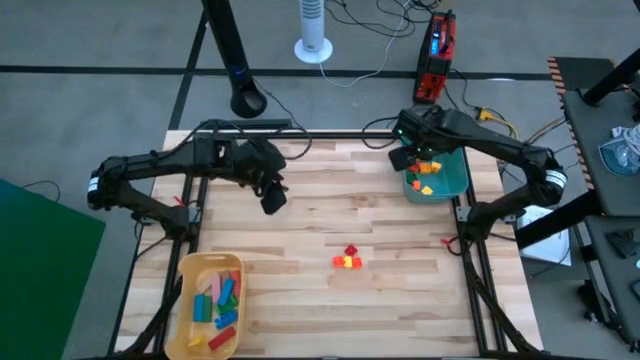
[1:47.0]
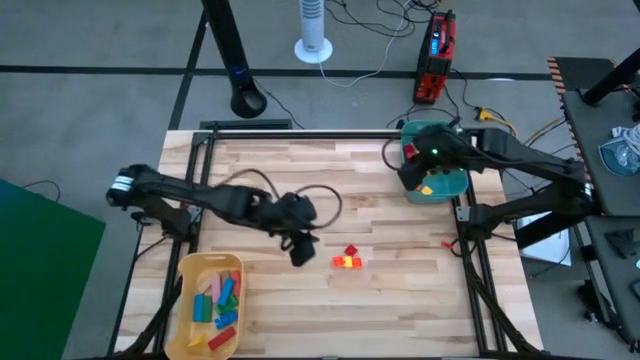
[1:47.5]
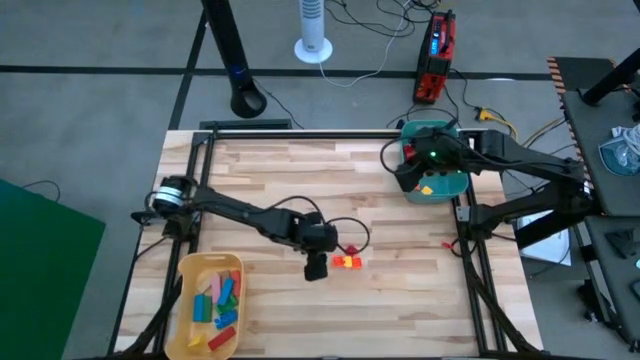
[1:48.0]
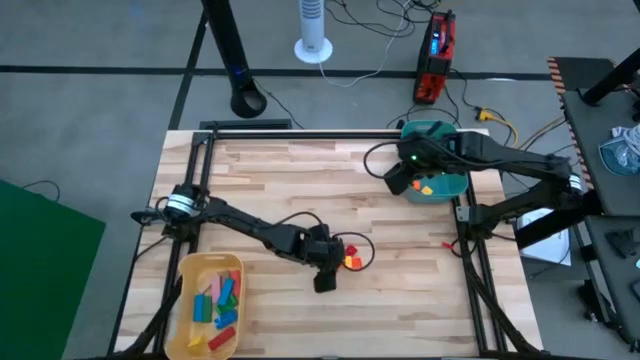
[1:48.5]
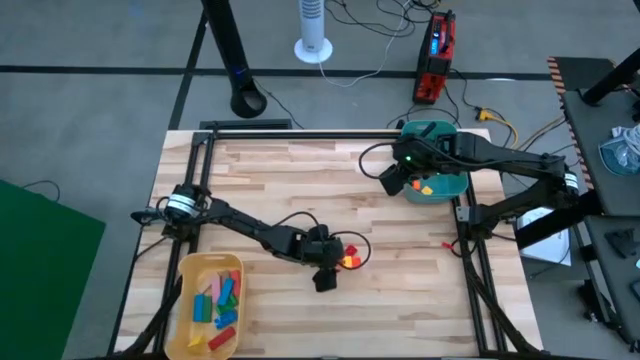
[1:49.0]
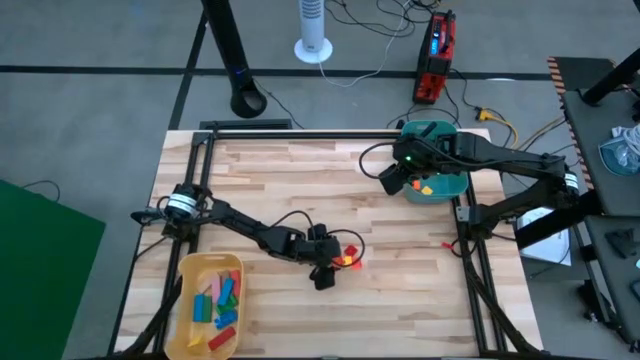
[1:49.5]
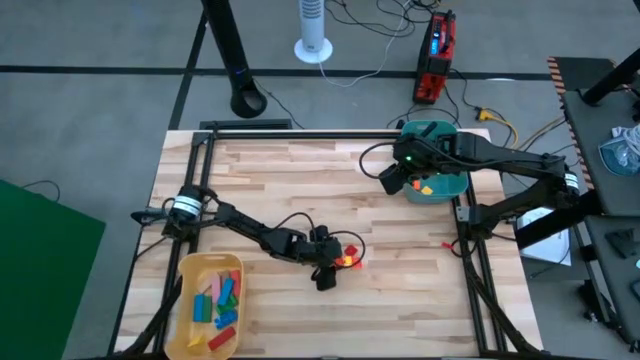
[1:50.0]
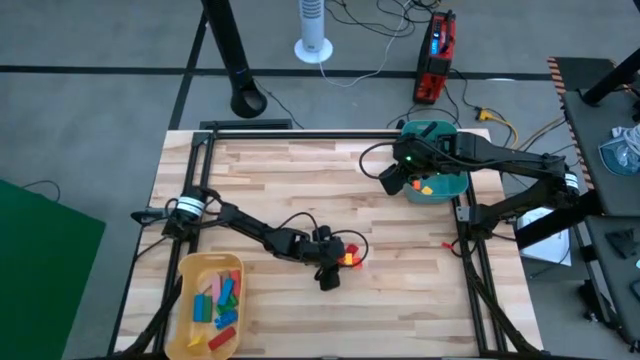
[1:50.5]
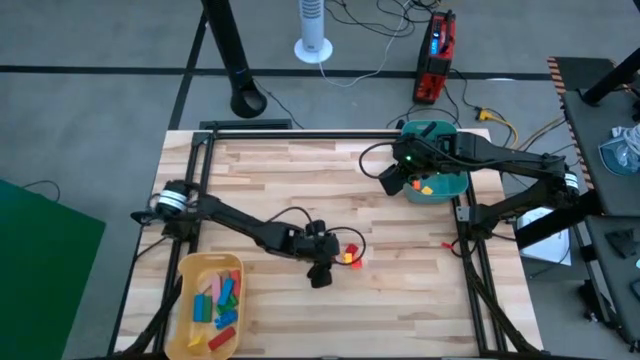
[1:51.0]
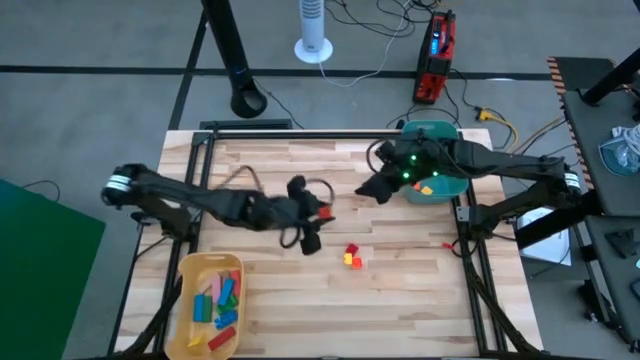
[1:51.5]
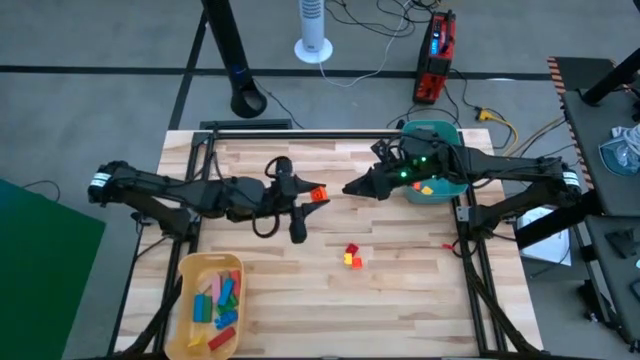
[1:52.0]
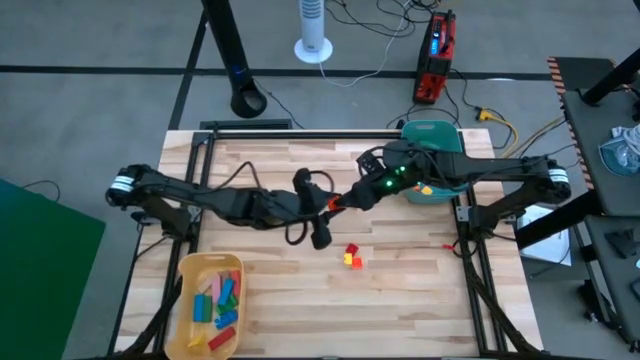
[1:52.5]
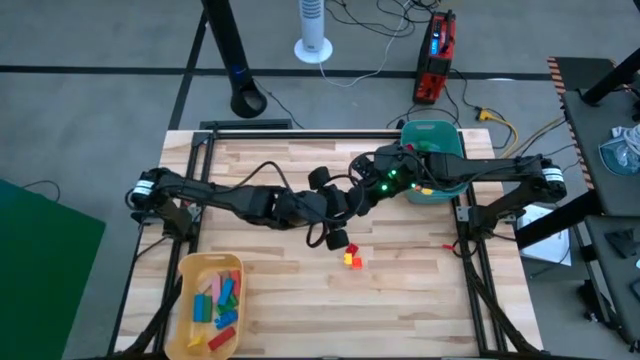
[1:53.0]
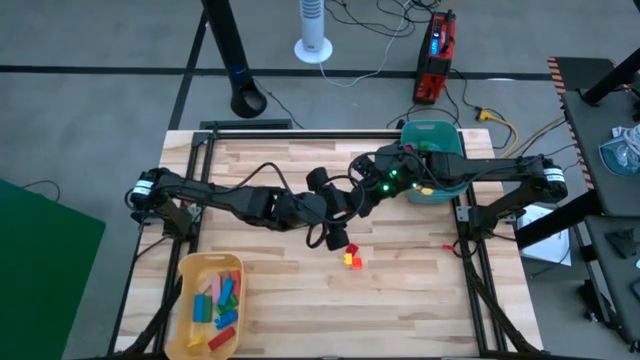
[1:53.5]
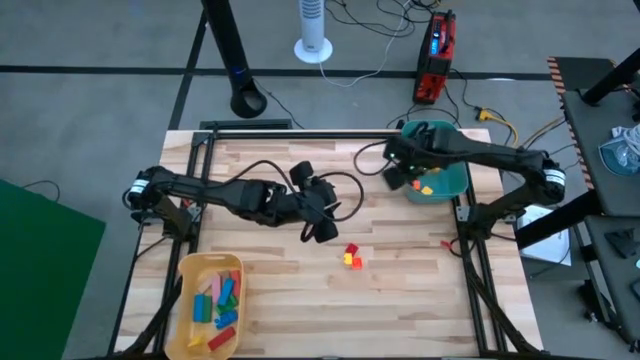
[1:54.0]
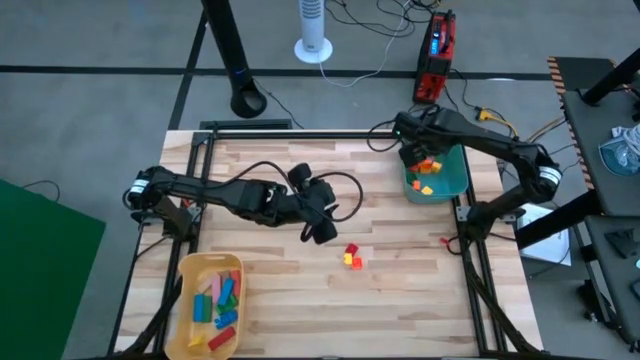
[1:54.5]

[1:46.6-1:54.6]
Task: Sort blocks
Put the orange 4-stud game piece into the green bin

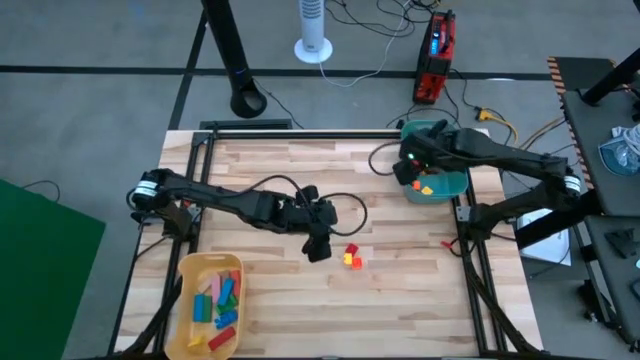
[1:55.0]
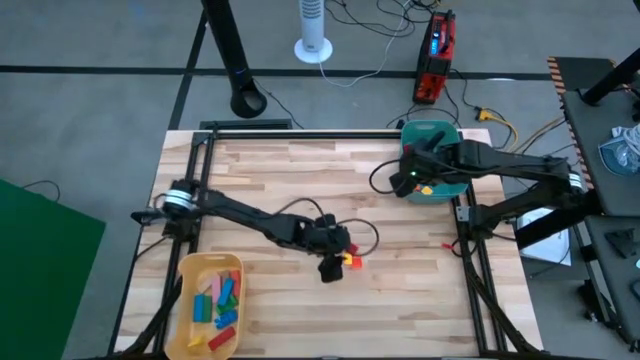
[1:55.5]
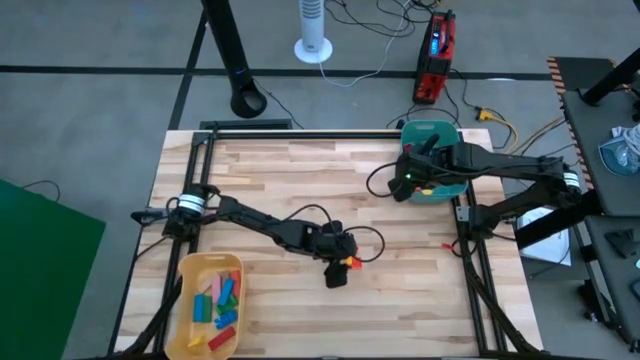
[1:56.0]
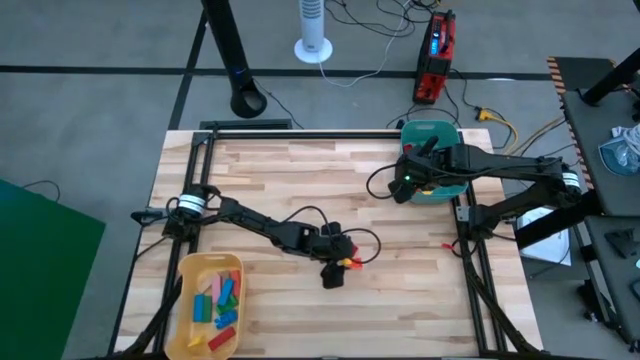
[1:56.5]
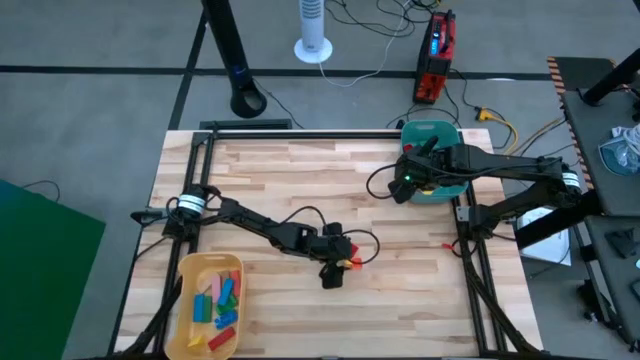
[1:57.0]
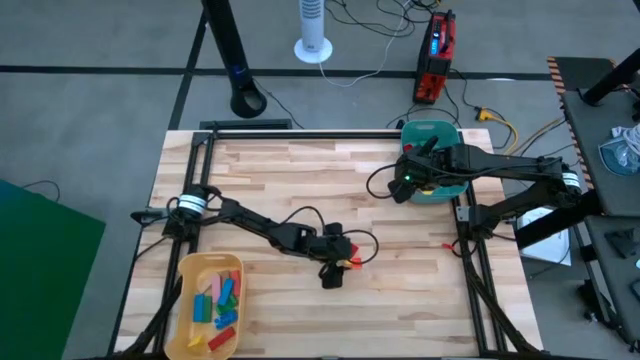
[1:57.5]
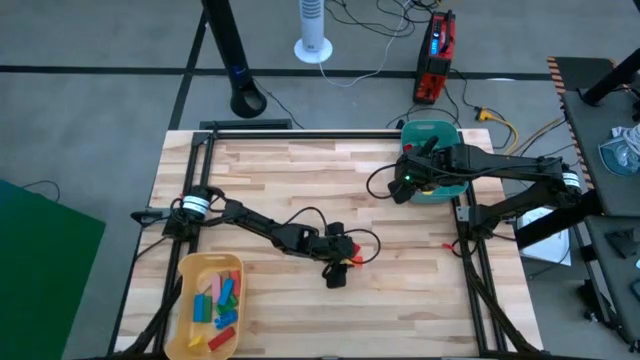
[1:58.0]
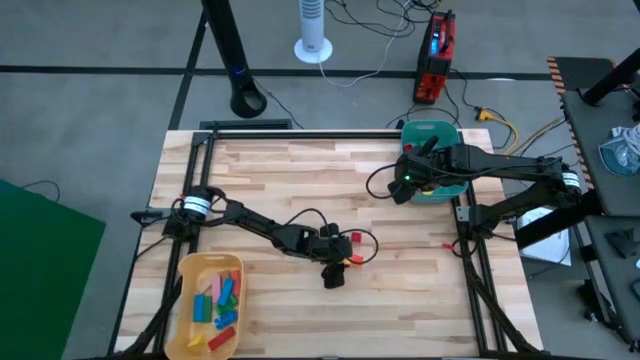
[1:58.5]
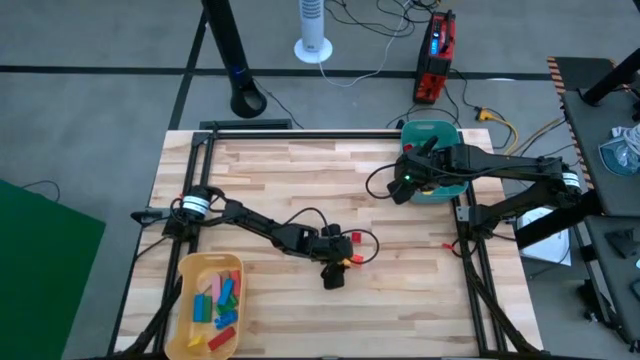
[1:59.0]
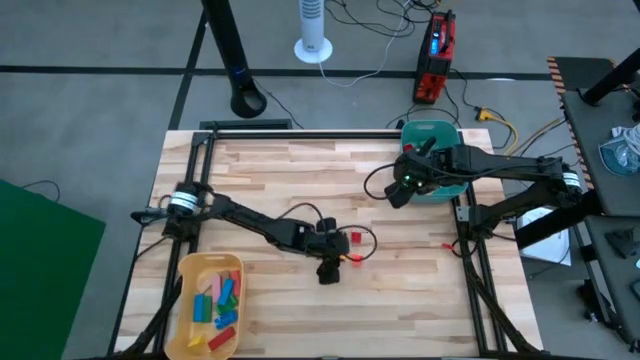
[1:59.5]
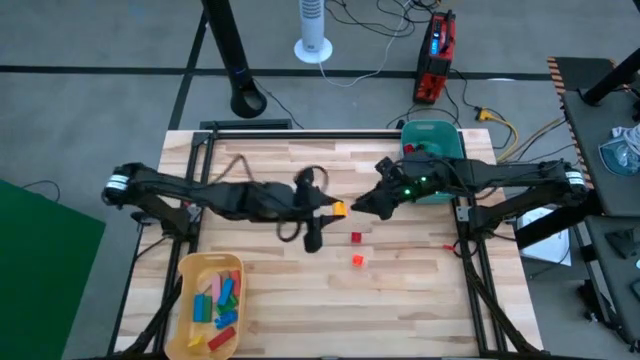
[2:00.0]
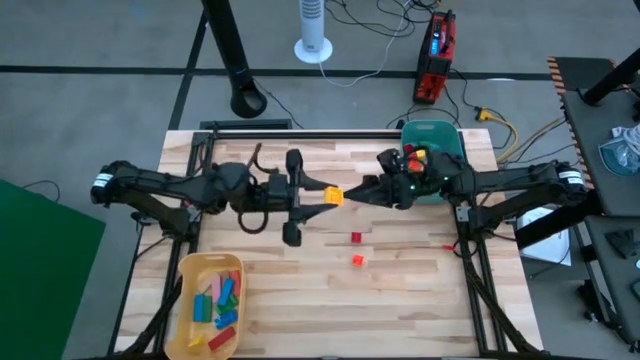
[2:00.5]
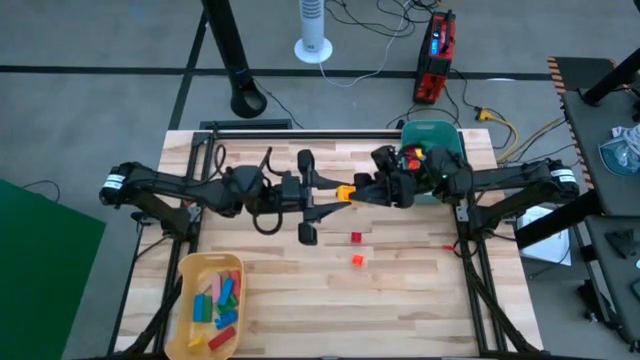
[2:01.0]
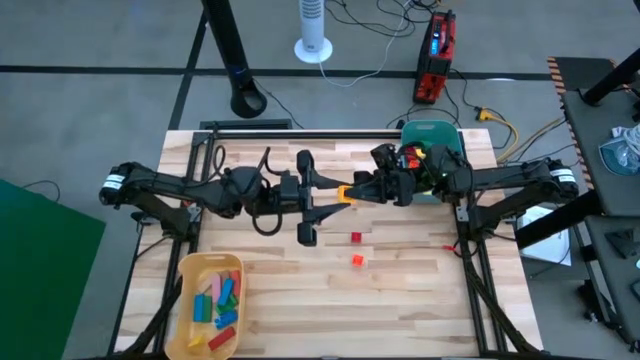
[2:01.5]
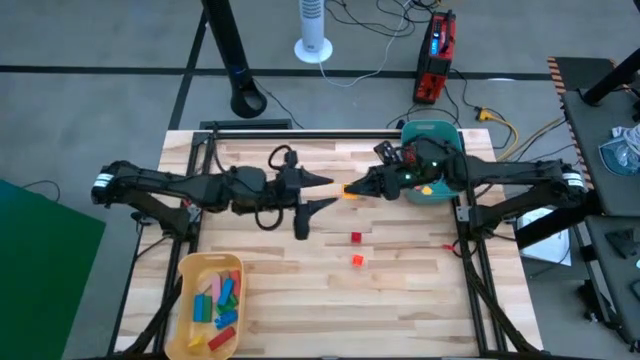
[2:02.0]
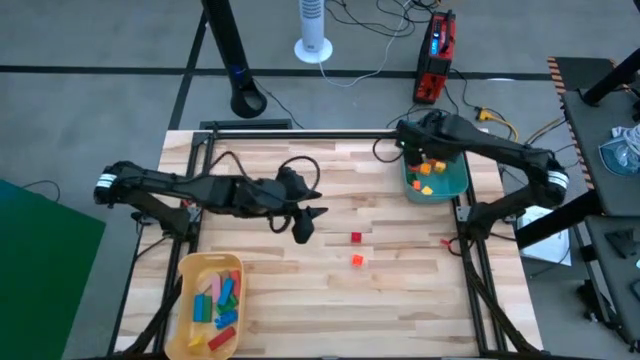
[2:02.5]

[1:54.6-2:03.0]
Put the yellow 4-stud game piece into the green bin

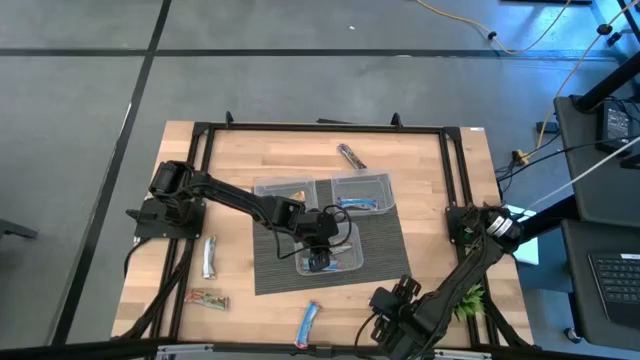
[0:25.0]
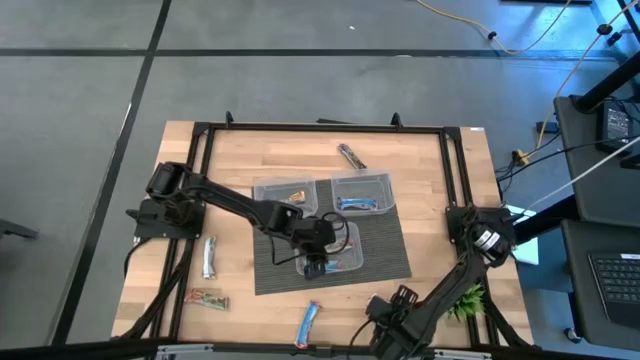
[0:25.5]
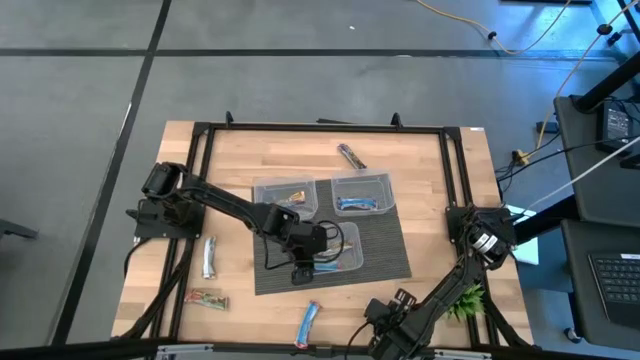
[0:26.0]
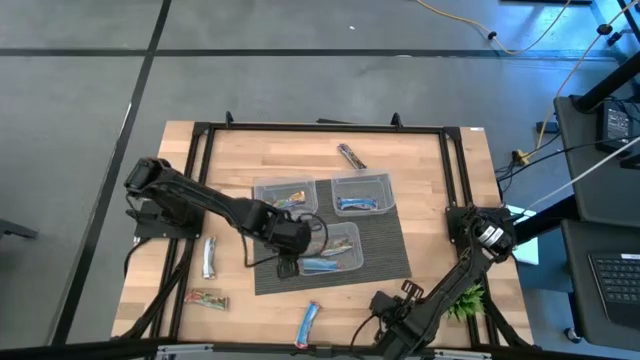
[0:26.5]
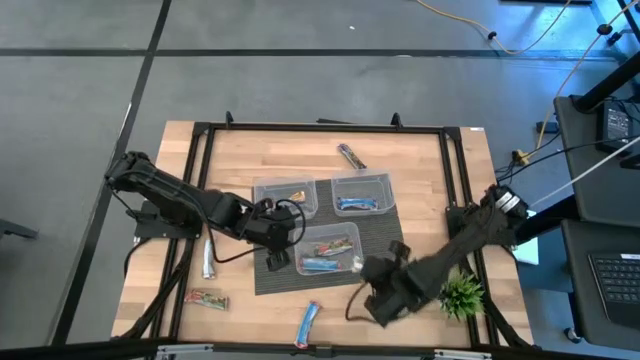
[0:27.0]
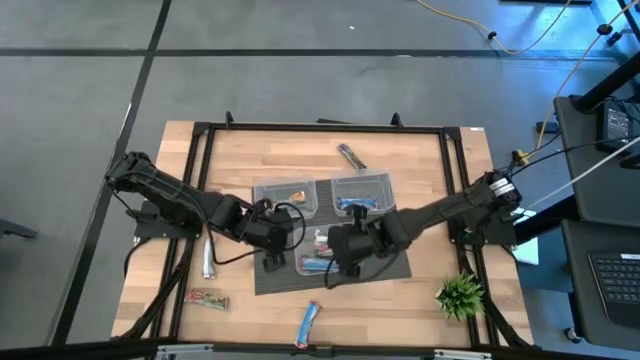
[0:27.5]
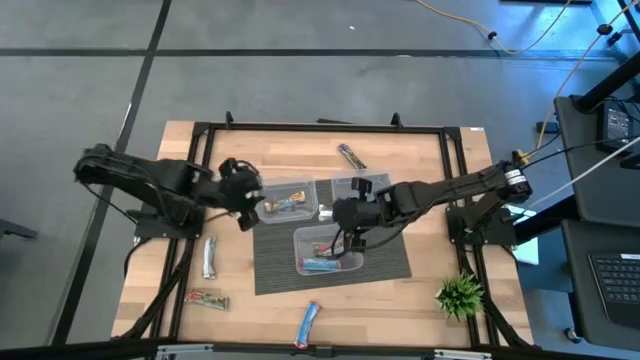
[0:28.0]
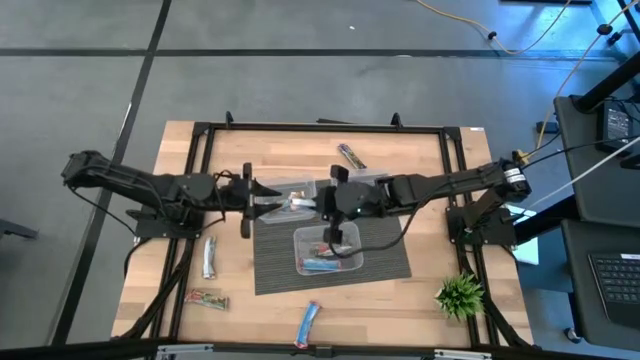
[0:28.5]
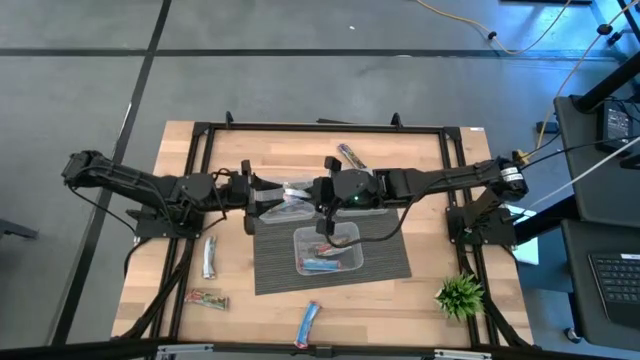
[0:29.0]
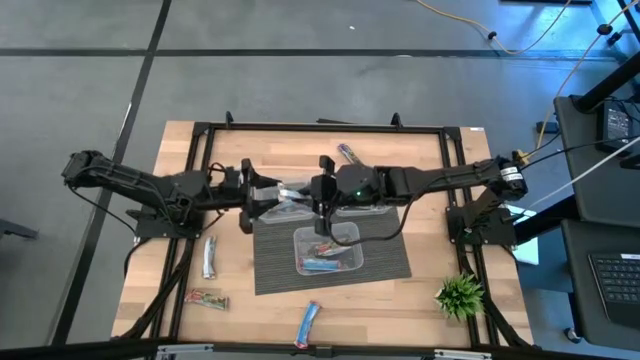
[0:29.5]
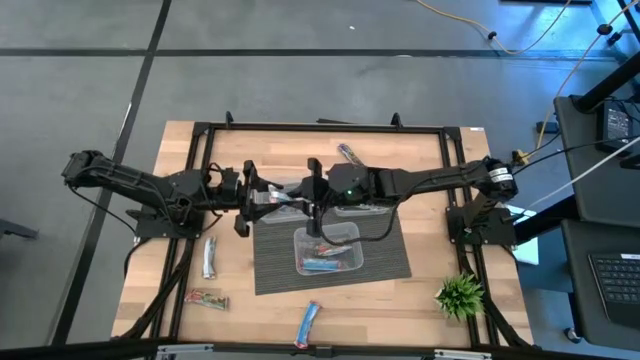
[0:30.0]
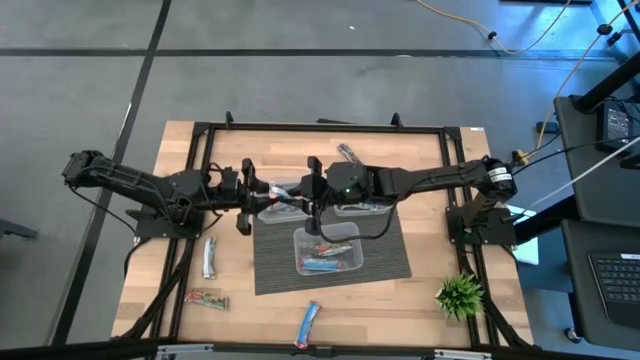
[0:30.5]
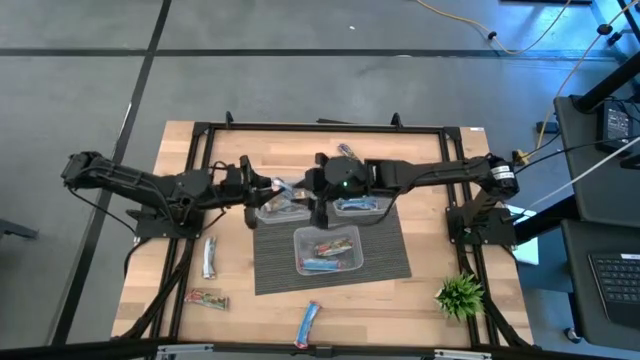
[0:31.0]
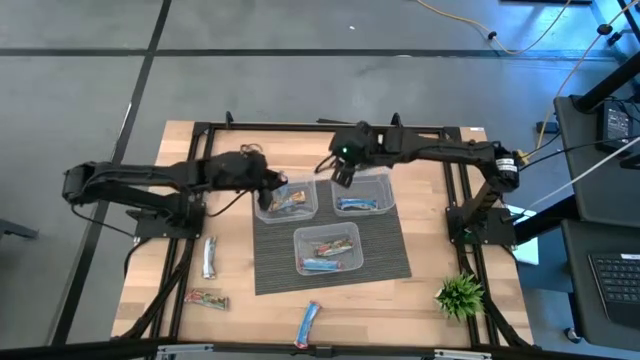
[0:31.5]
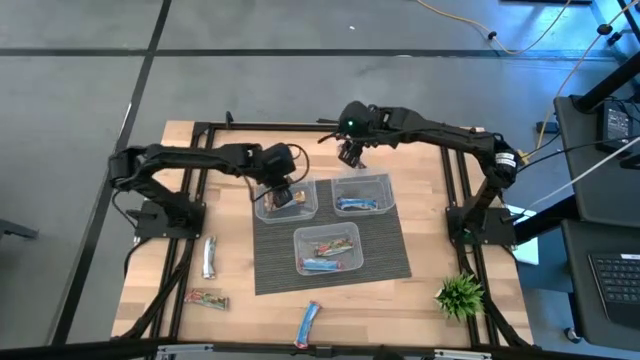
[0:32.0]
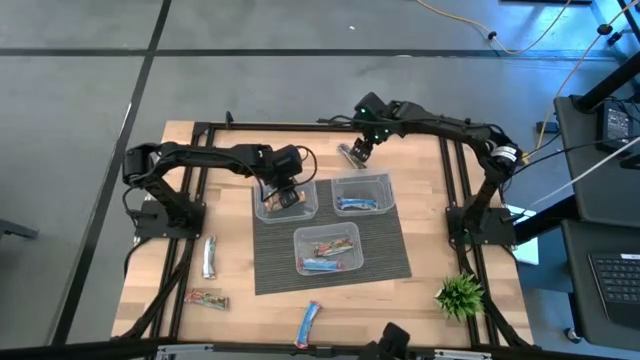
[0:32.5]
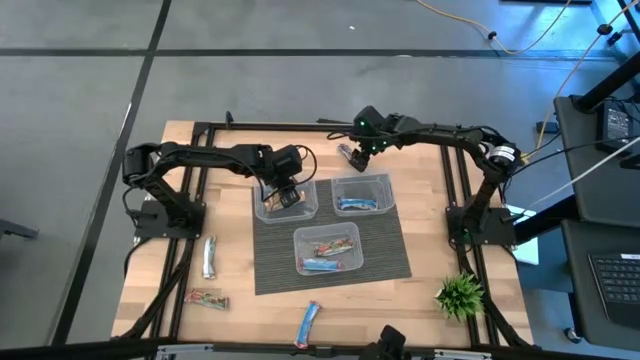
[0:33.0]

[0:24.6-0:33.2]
Task: Pick and place Granola Bars by type
Put the yellow granola bar into the top left transparent bin
